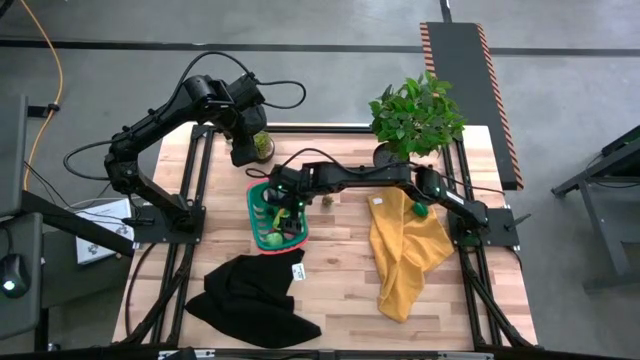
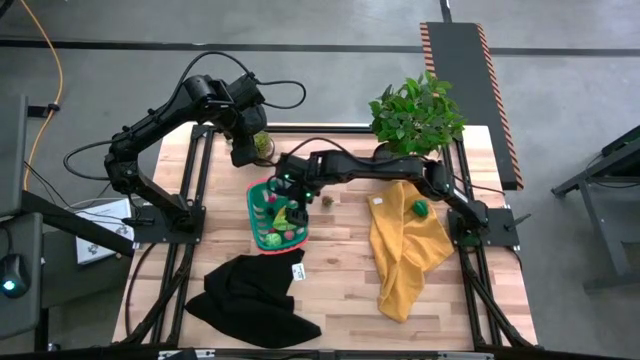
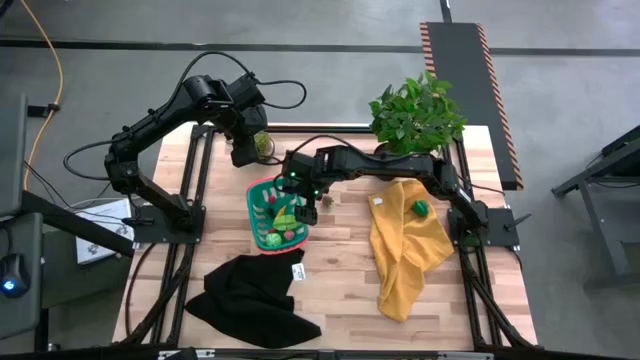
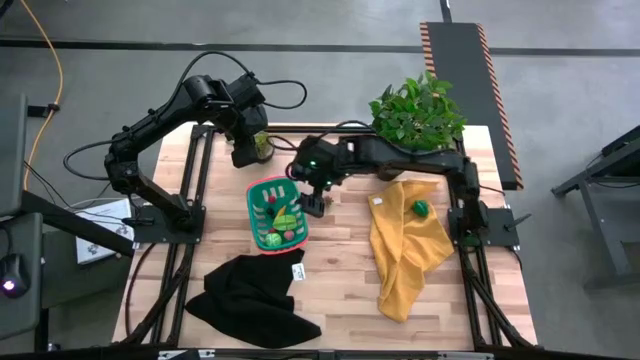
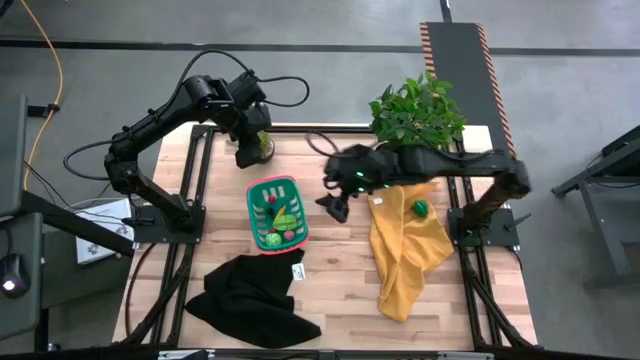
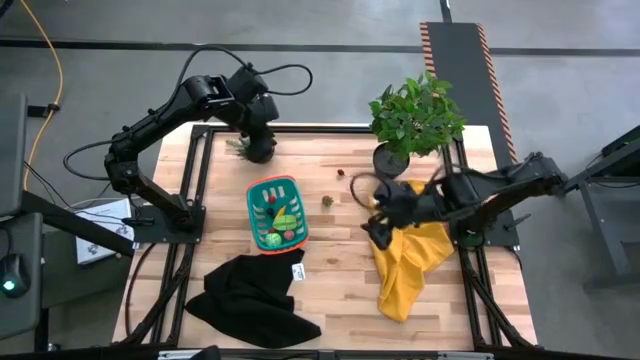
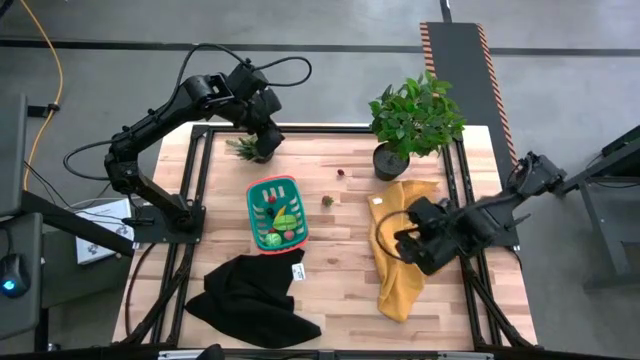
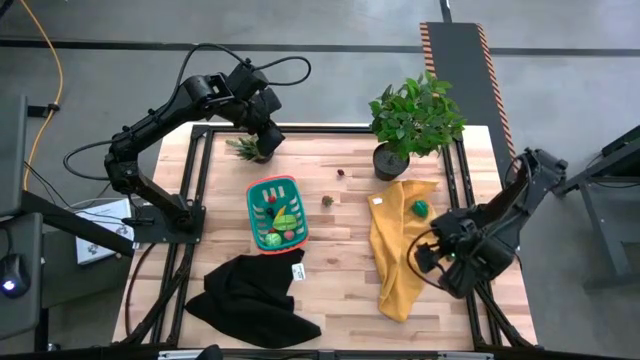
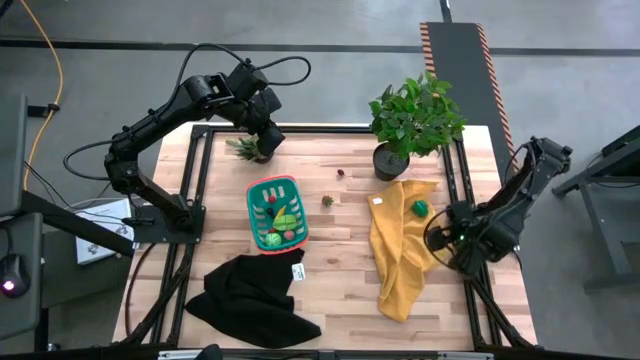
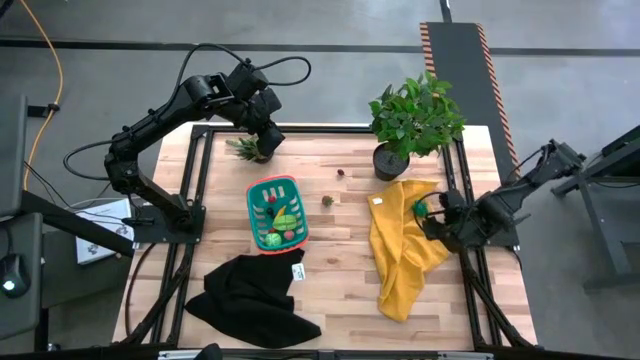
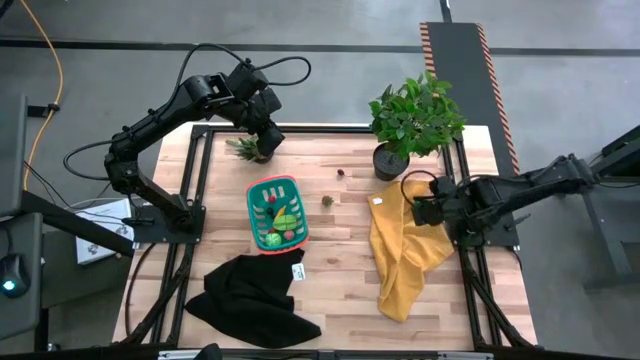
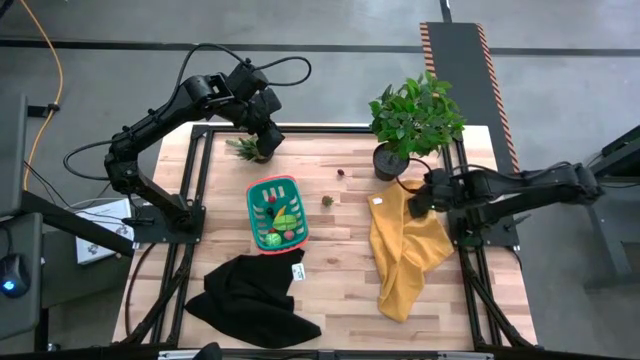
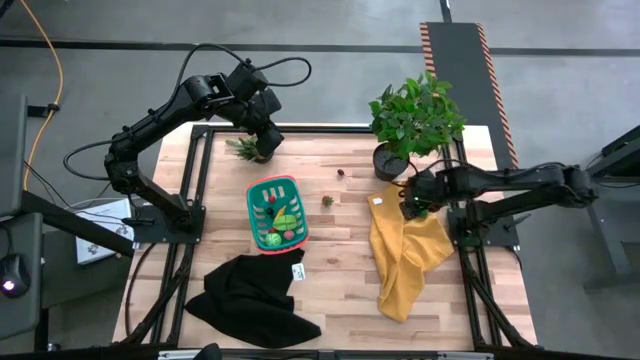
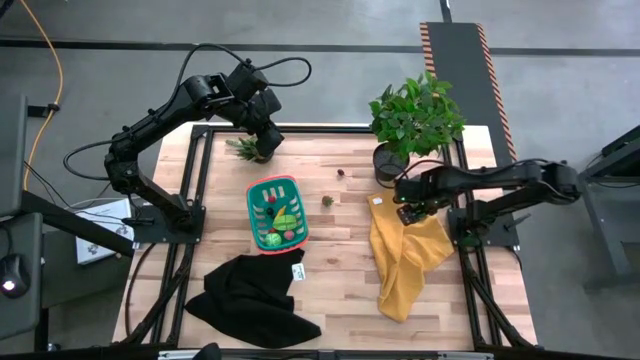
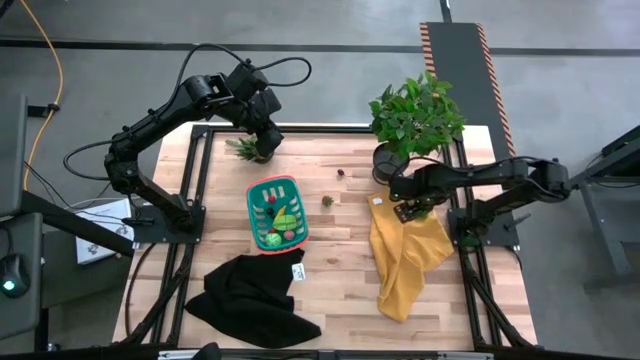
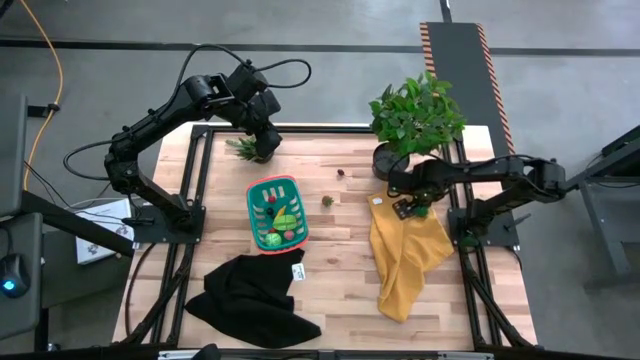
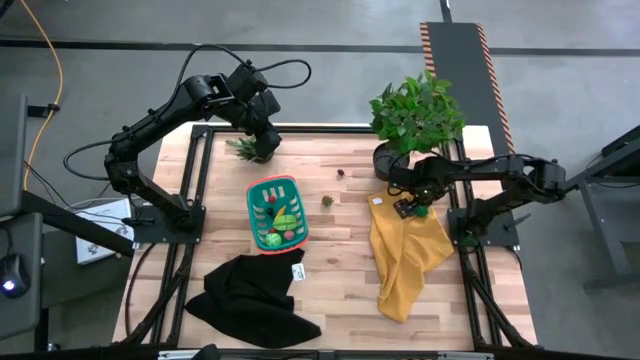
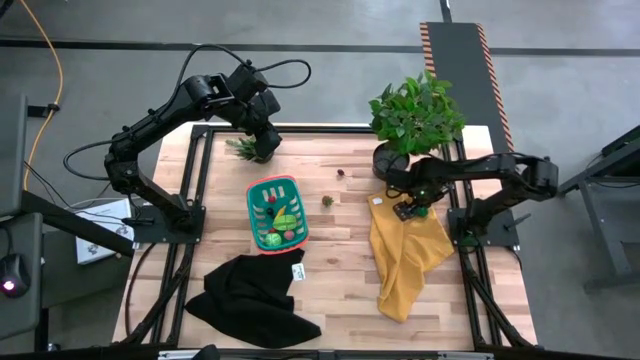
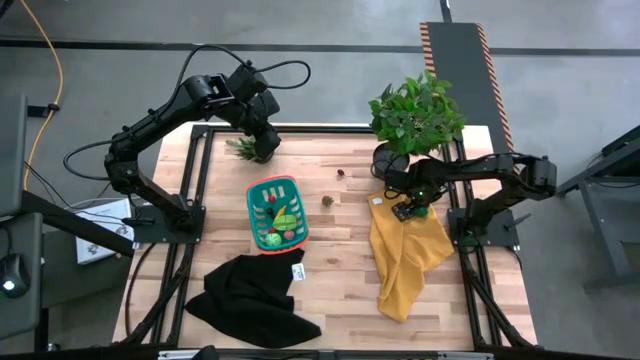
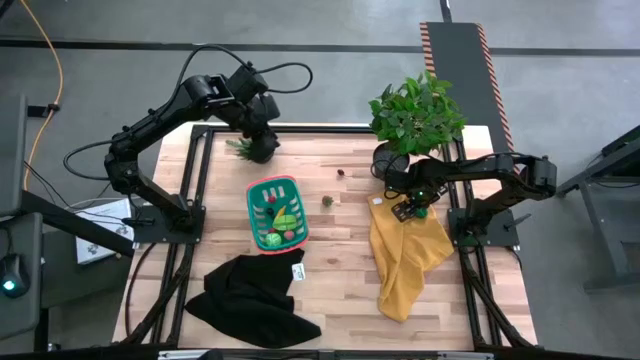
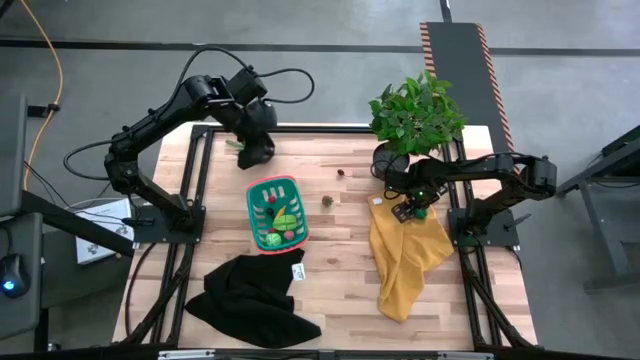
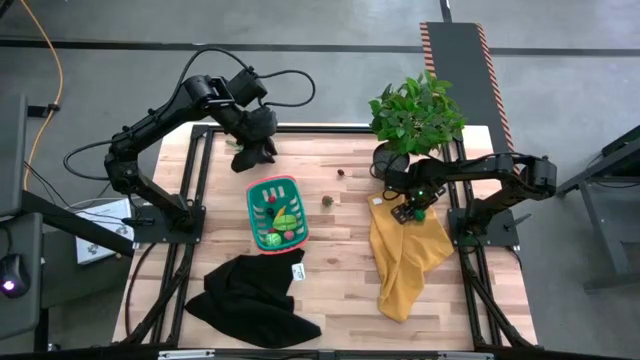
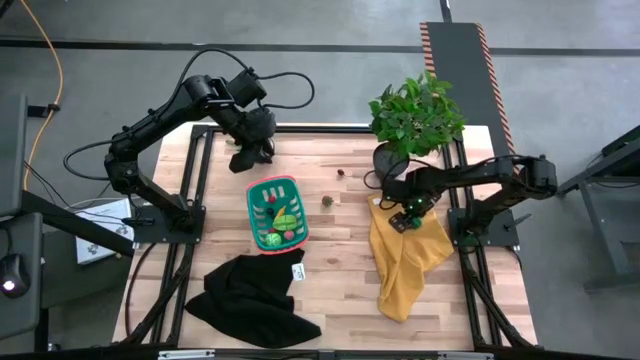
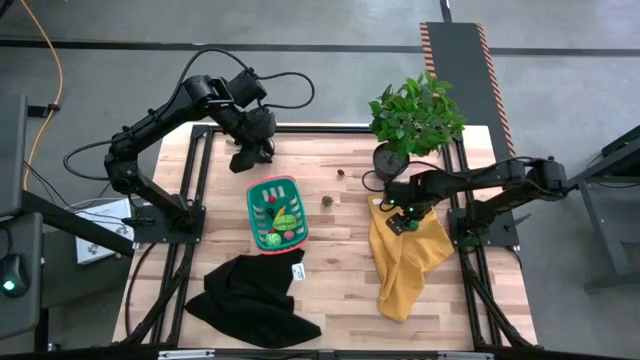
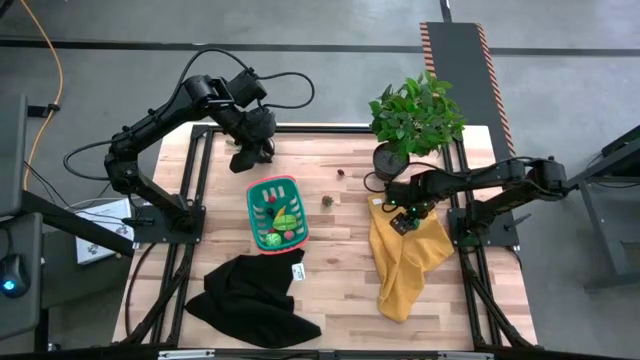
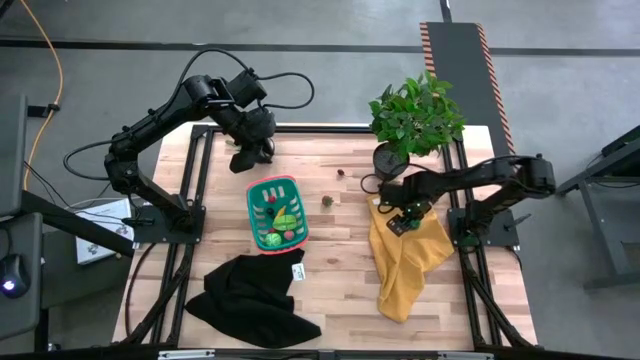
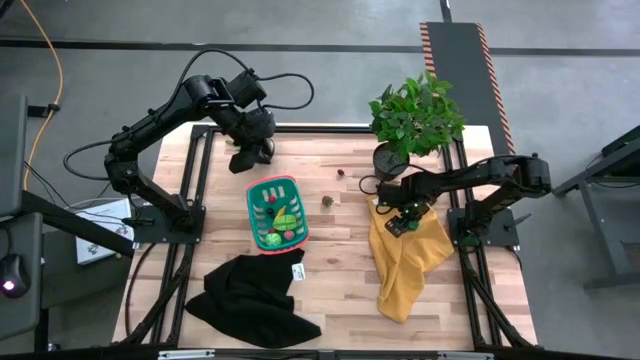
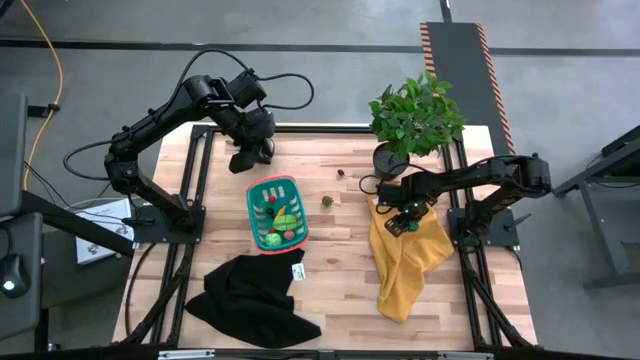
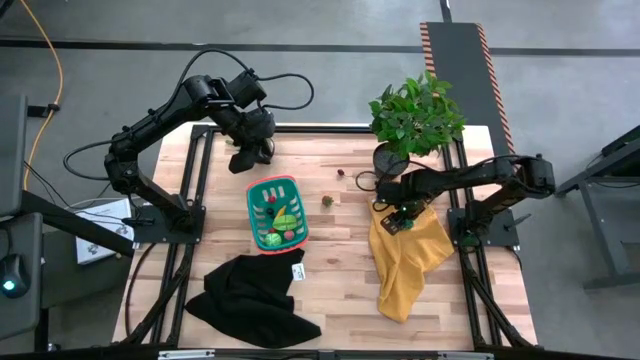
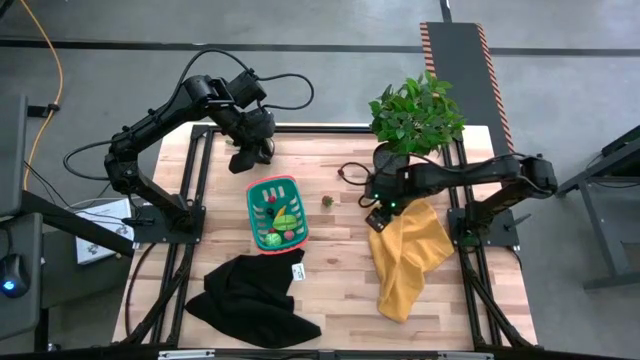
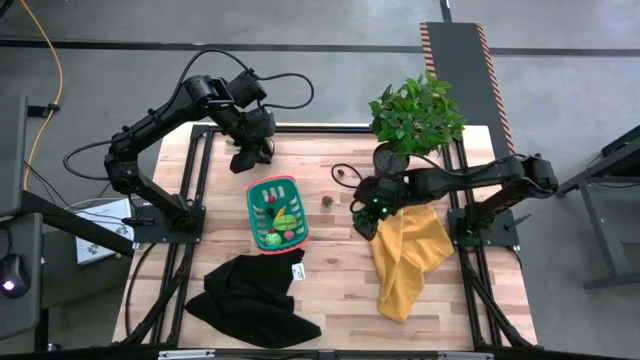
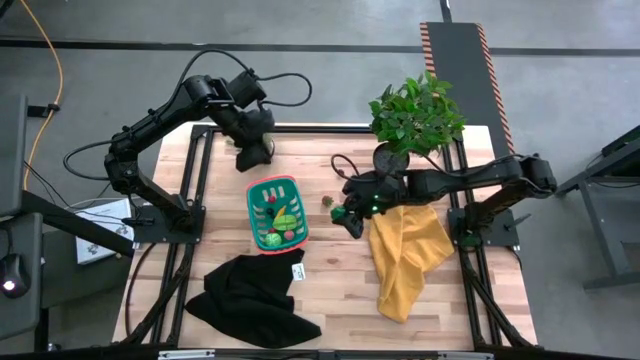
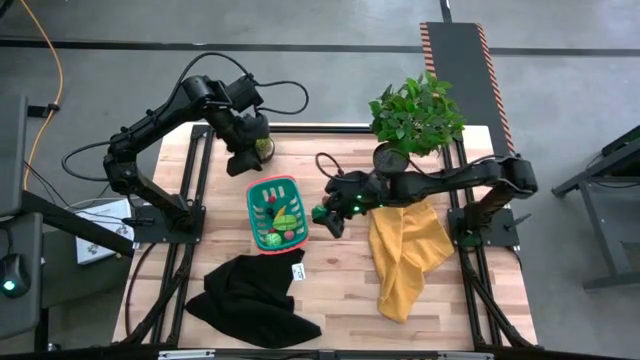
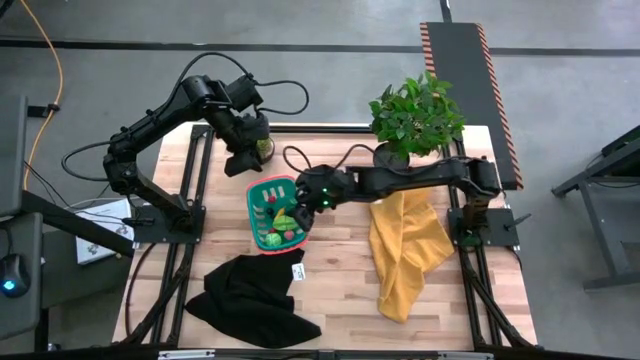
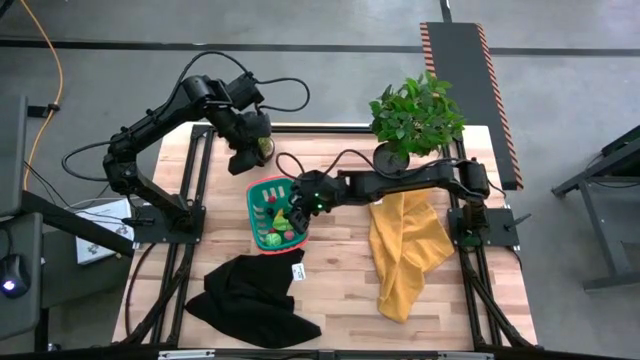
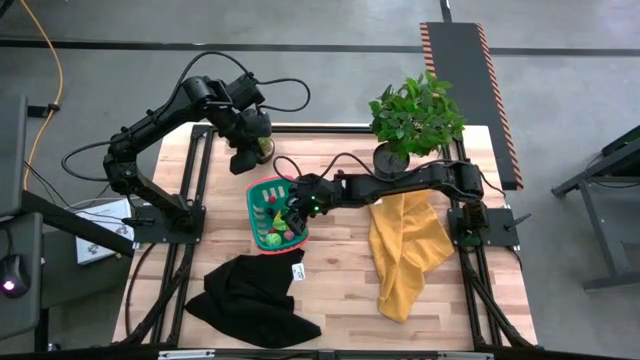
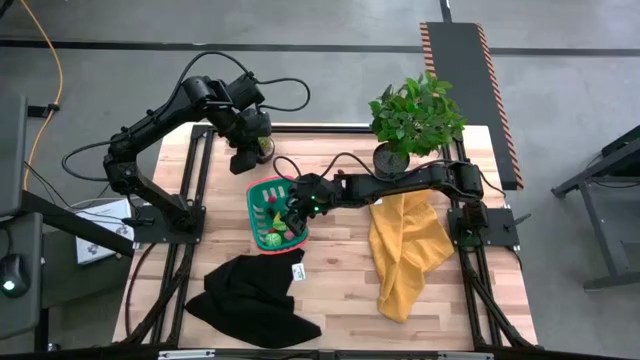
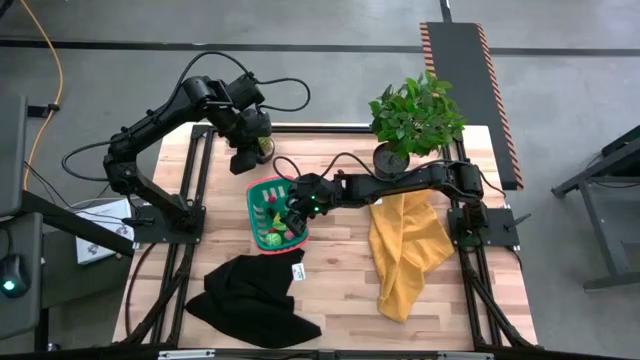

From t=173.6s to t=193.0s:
Task: Pick and placing Produce into tupperware
Put the green pepper in the green basket

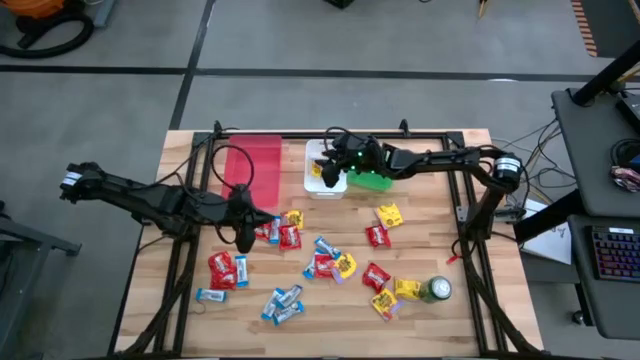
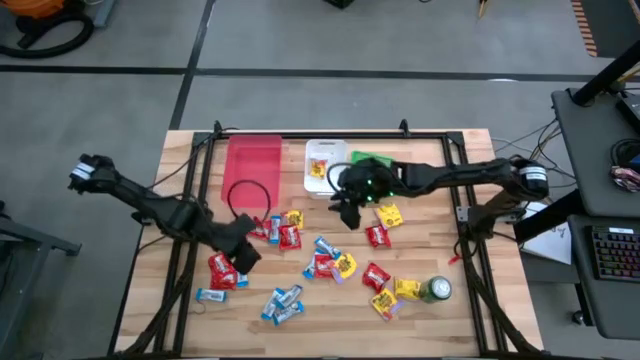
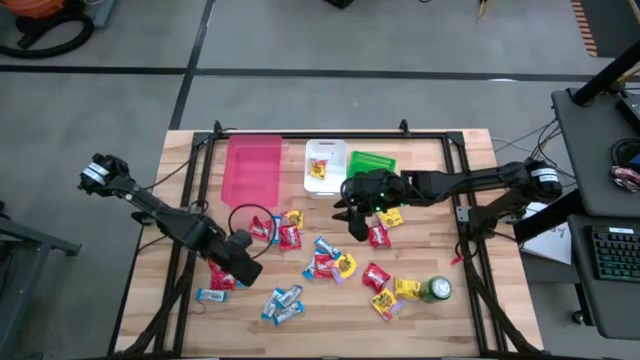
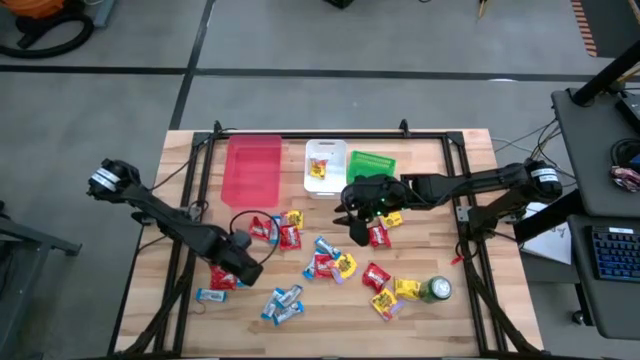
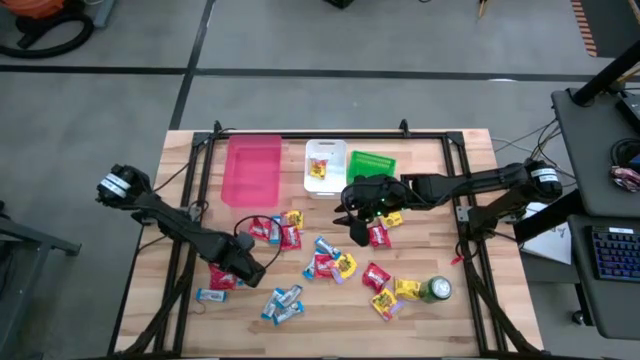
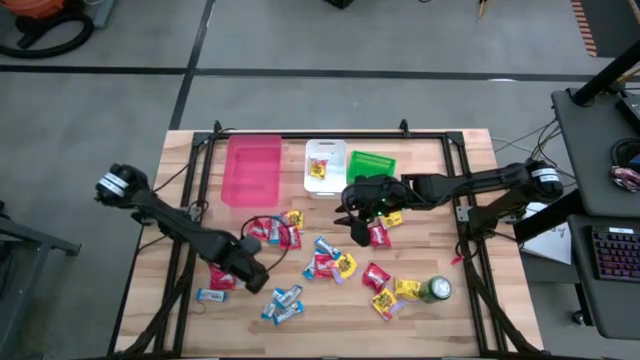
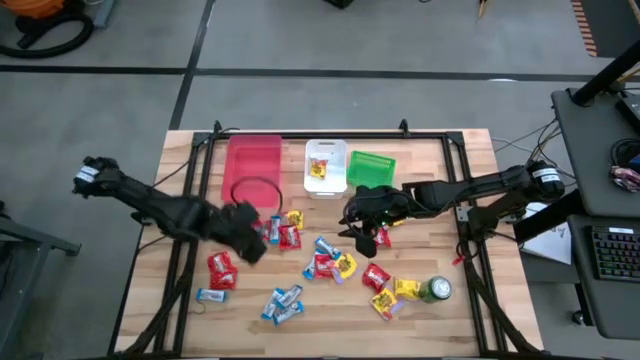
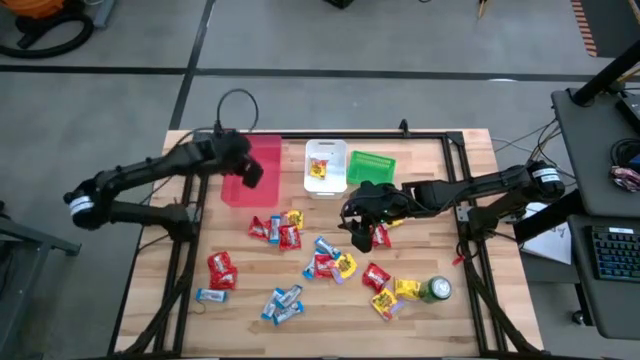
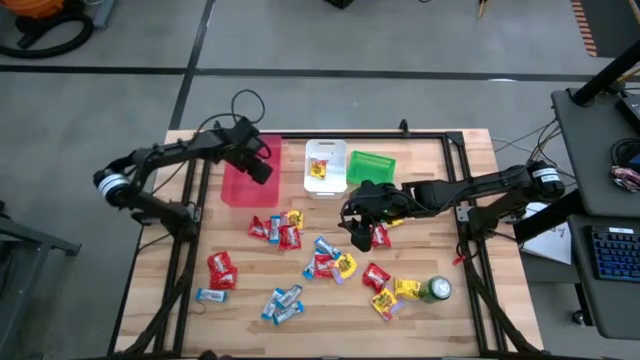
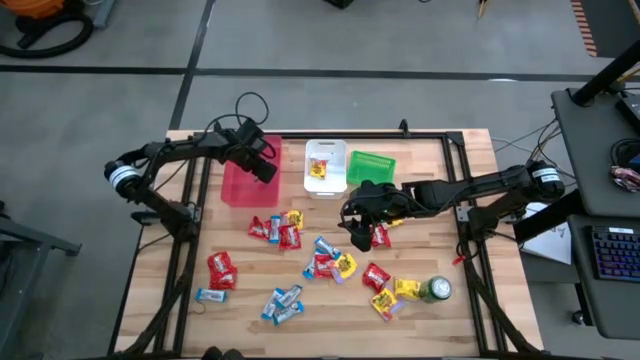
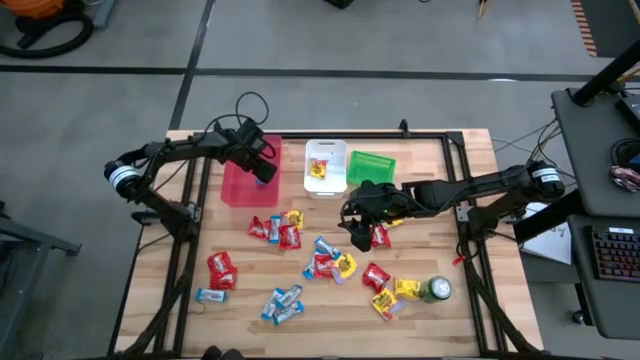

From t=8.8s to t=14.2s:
Task: Sort candy
Put the white chocolate into the pink bin
